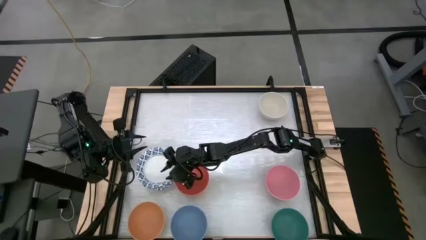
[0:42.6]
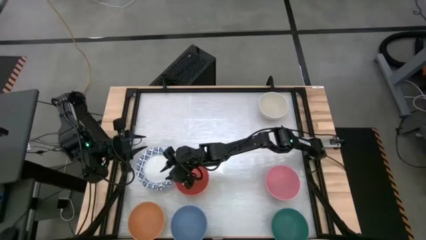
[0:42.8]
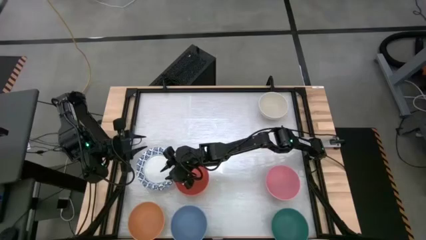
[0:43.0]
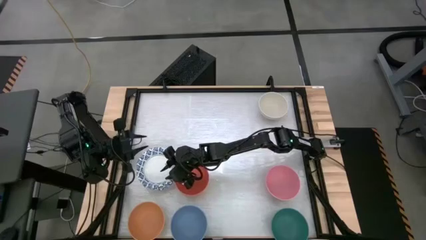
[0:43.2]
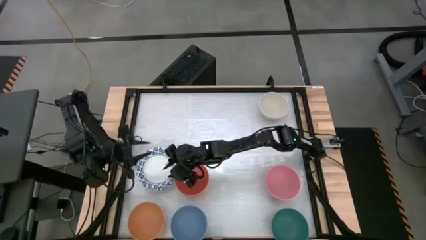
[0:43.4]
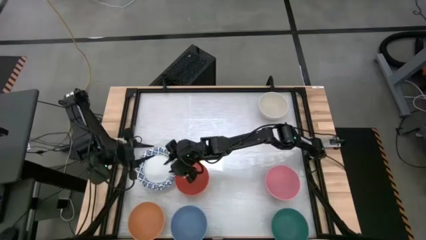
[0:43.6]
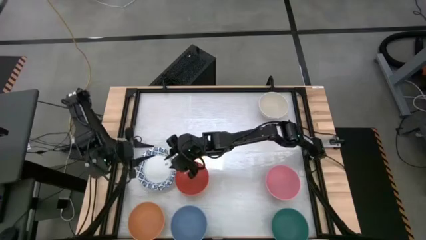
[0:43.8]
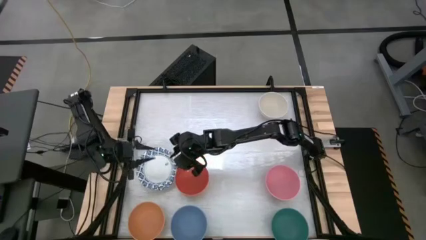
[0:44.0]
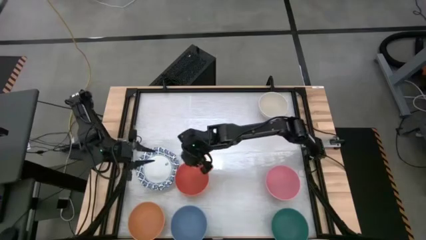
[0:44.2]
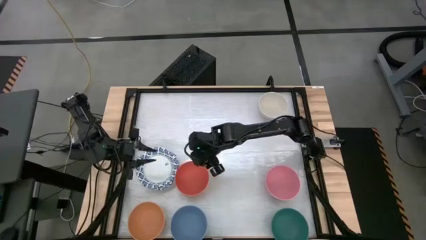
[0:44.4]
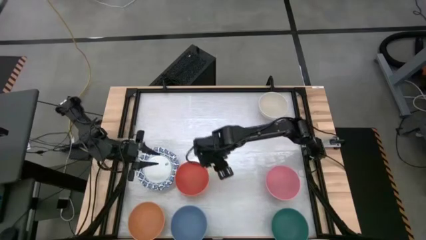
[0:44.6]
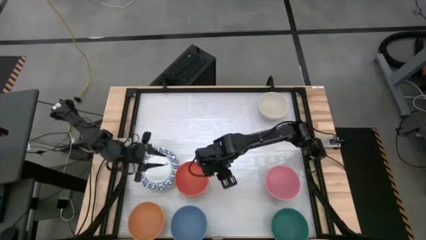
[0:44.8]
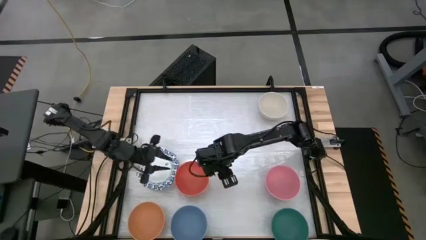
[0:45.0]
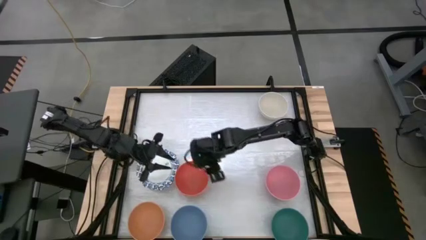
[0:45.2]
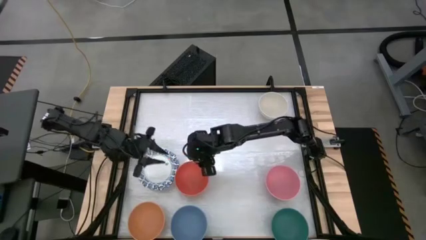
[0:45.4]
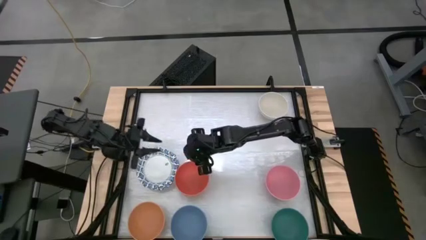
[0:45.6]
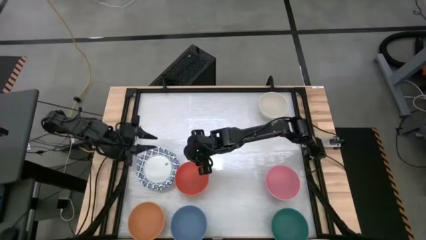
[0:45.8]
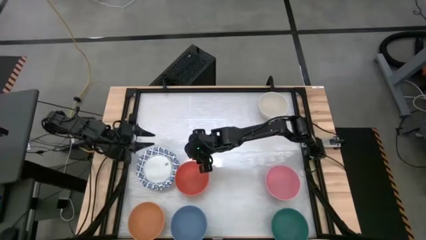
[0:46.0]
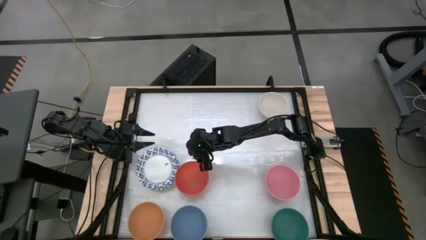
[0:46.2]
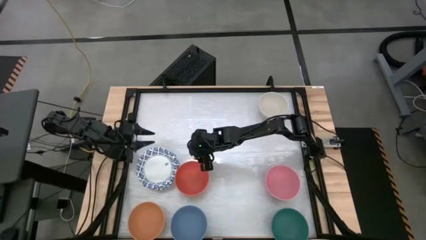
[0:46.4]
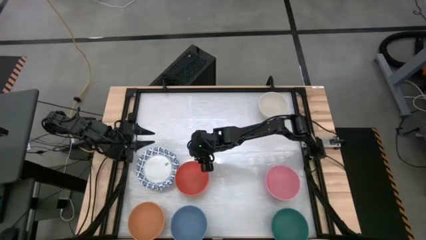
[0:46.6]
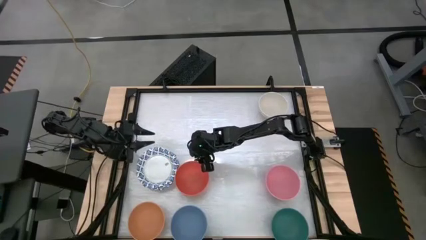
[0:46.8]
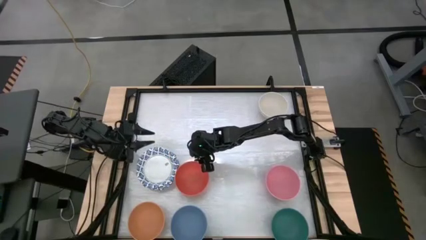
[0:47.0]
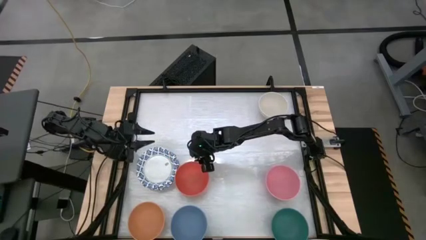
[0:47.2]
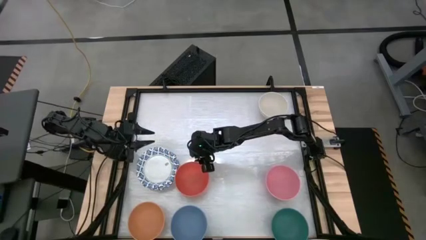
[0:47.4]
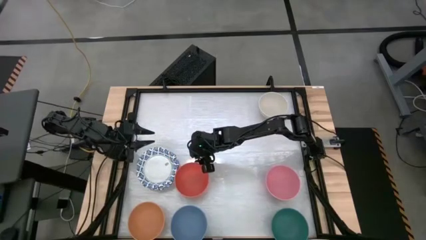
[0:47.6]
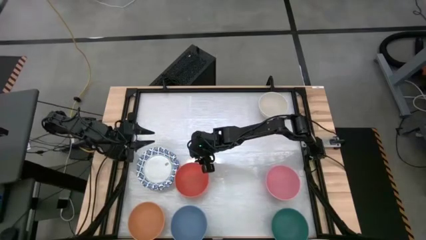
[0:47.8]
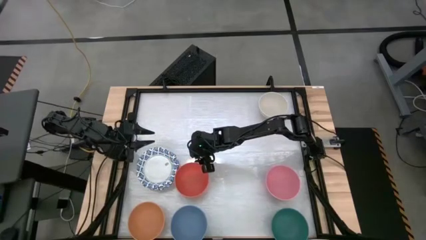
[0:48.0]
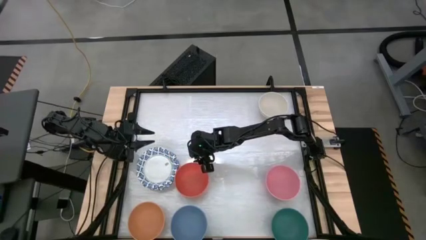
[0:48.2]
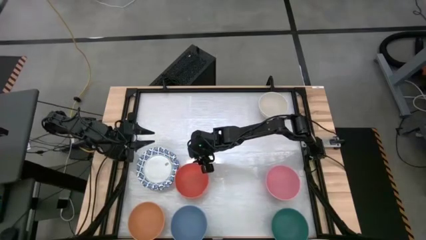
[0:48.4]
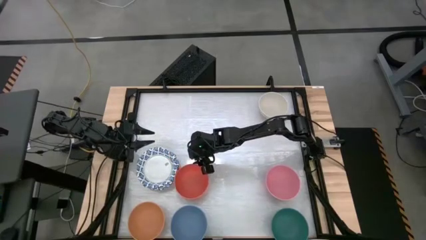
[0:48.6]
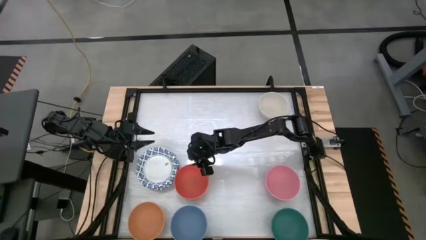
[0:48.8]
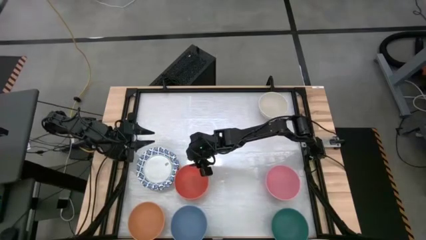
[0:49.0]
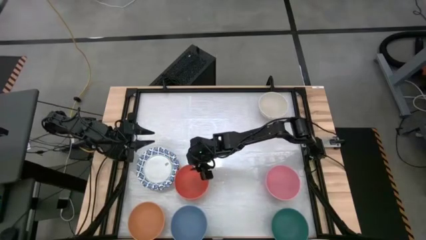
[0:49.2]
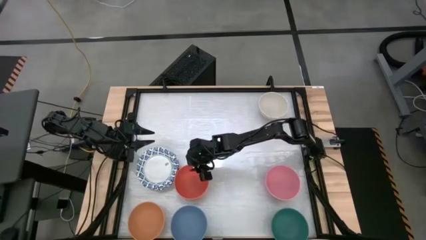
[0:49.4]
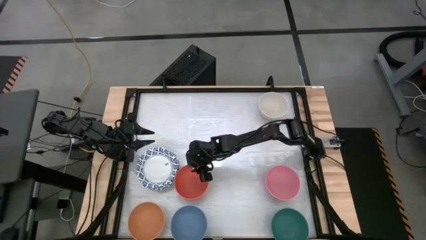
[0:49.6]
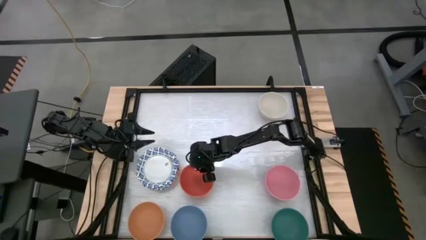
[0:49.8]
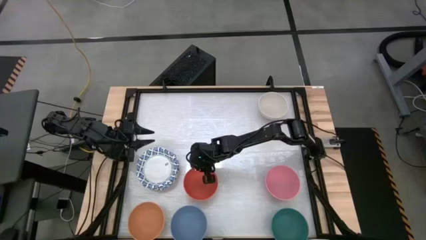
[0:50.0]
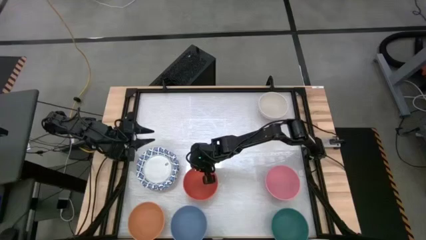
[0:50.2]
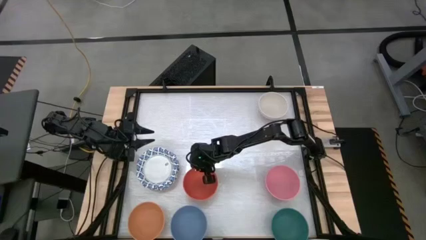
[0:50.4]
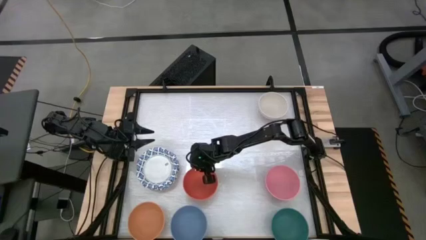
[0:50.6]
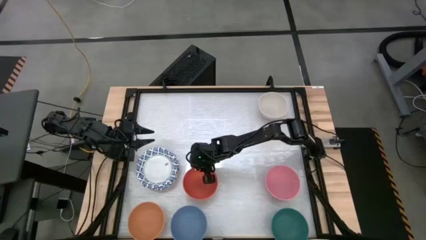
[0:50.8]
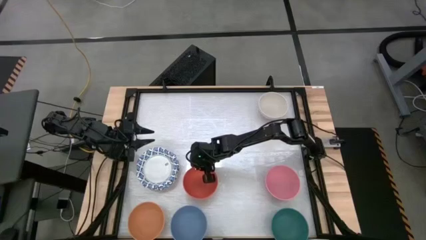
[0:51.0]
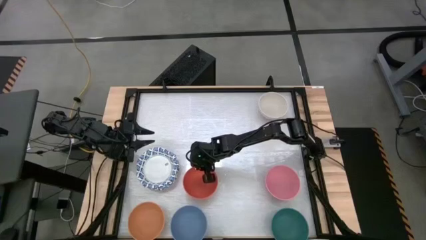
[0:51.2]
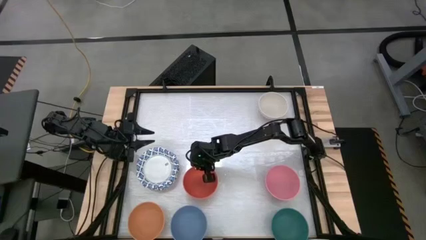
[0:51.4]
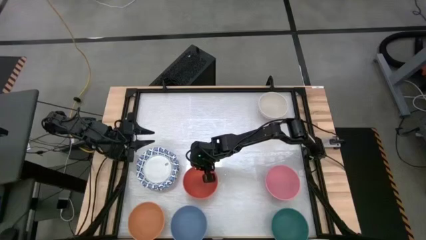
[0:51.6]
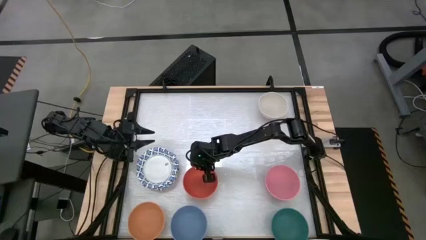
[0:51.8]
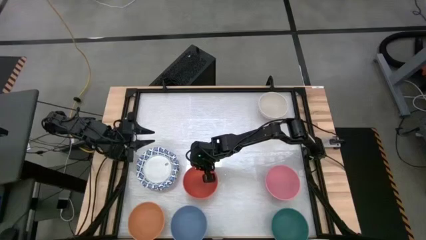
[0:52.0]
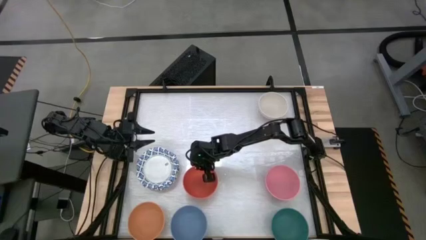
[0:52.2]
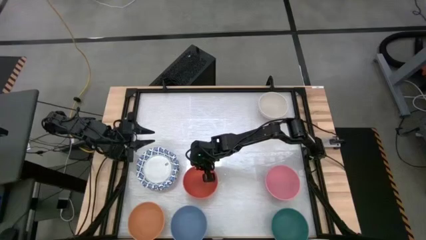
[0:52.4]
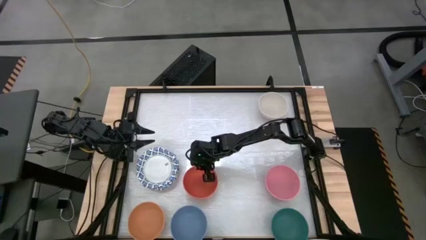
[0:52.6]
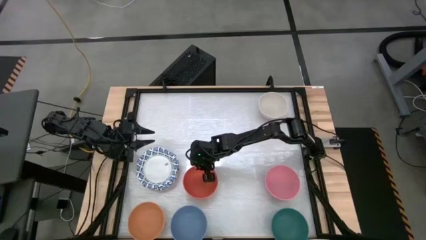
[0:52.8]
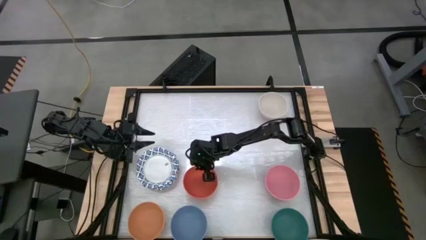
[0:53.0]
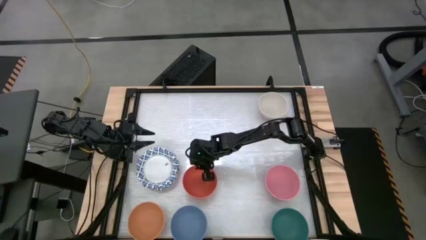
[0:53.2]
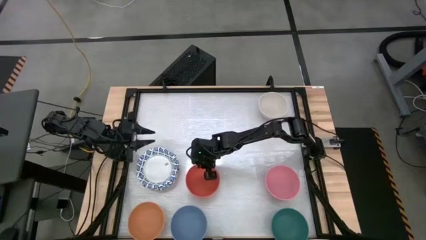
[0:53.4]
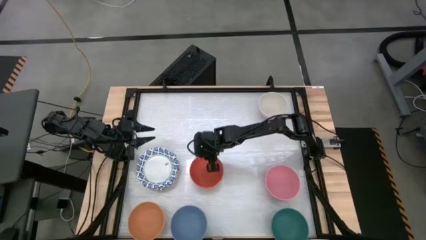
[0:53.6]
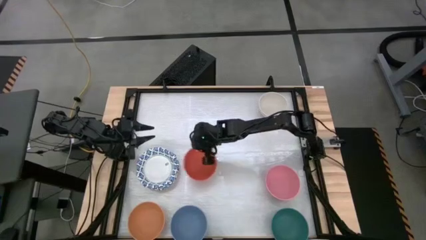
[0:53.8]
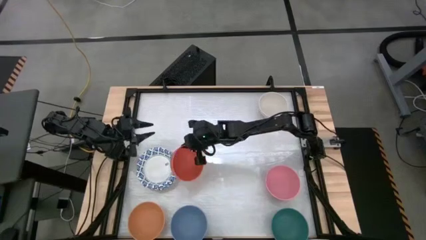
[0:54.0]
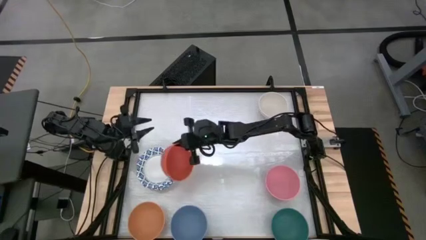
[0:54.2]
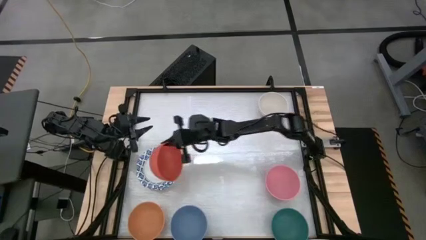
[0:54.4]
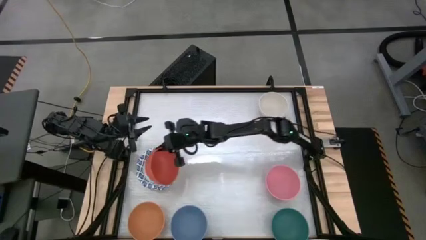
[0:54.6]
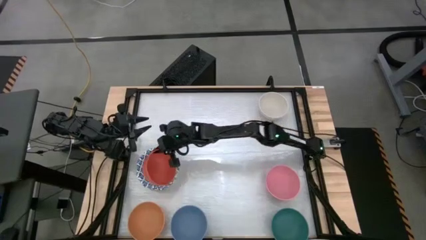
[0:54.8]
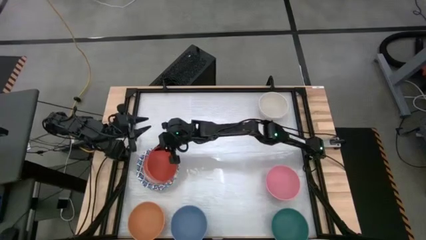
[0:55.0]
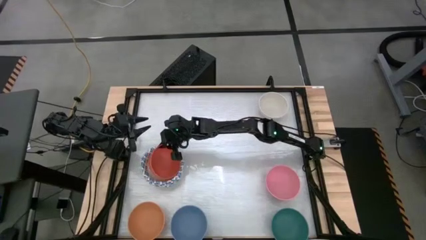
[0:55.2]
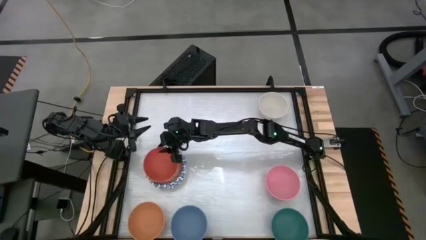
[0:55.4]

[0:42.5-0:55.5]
Stack the orange bowl into the blue patterned bowl
